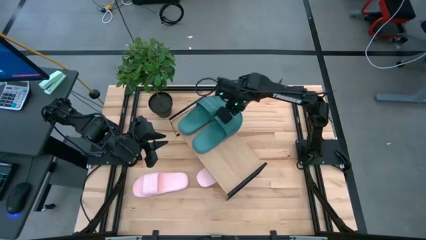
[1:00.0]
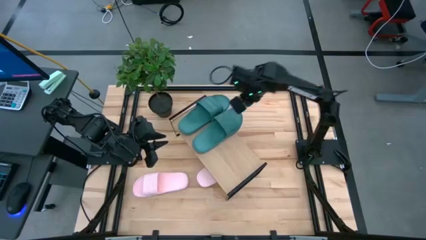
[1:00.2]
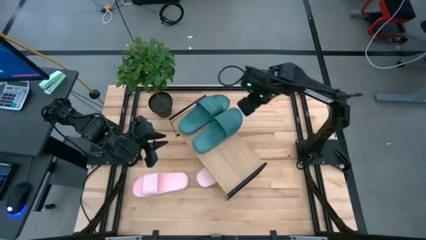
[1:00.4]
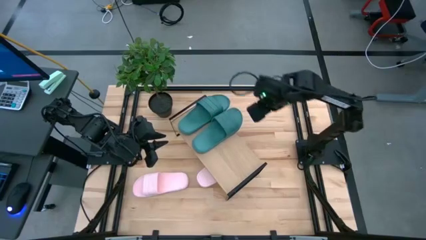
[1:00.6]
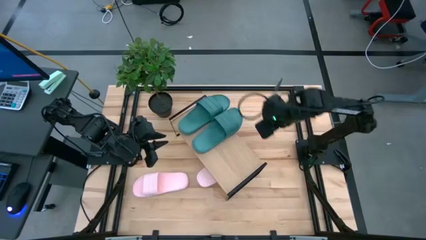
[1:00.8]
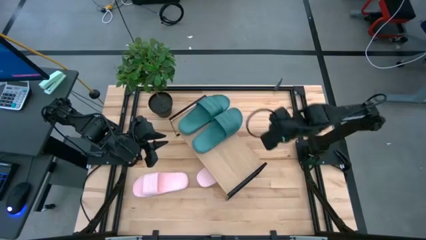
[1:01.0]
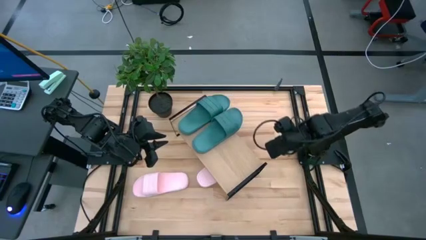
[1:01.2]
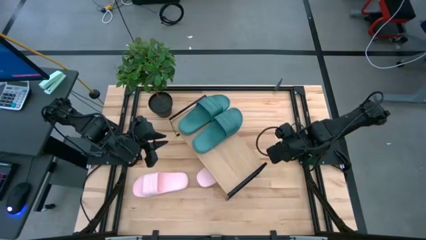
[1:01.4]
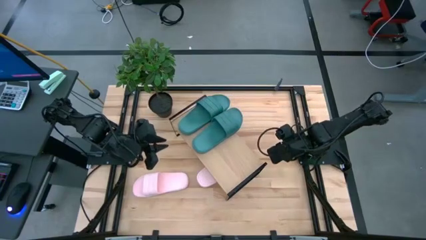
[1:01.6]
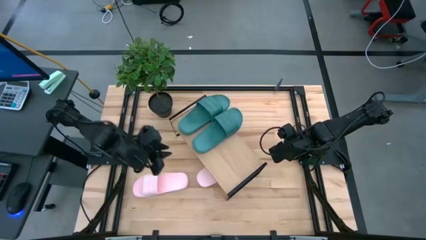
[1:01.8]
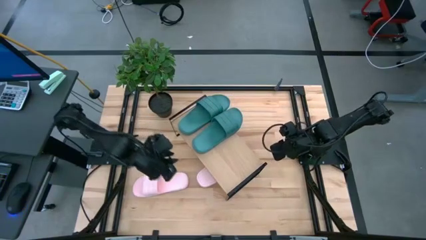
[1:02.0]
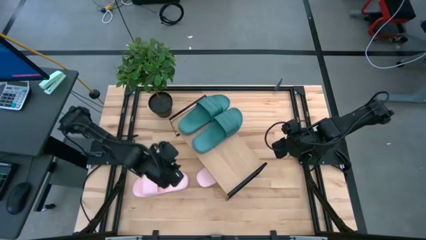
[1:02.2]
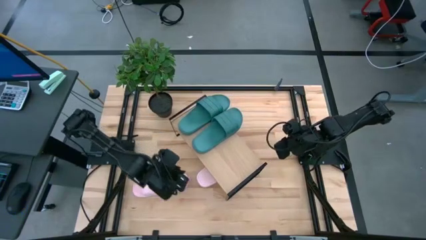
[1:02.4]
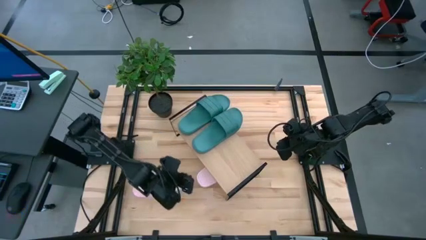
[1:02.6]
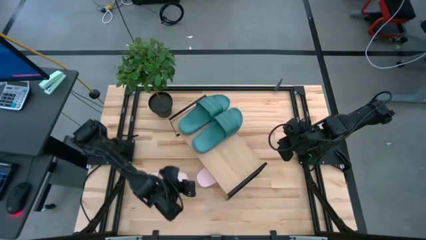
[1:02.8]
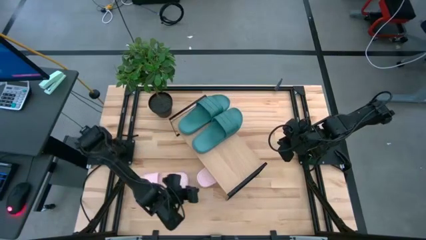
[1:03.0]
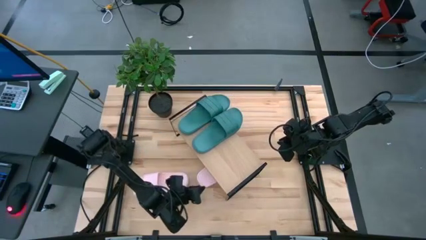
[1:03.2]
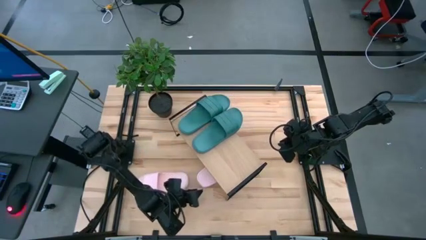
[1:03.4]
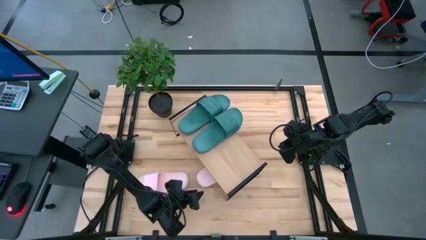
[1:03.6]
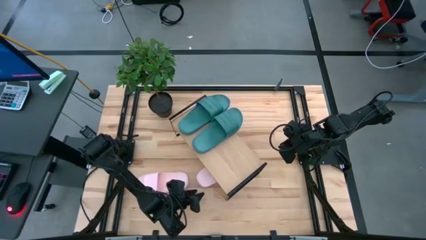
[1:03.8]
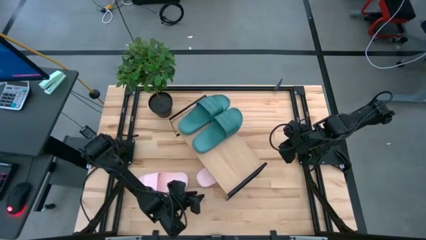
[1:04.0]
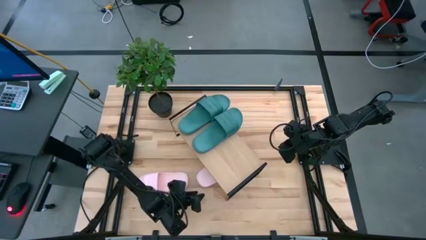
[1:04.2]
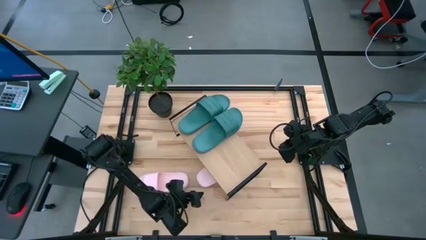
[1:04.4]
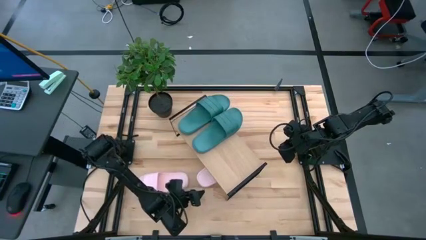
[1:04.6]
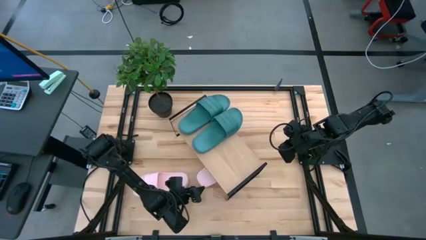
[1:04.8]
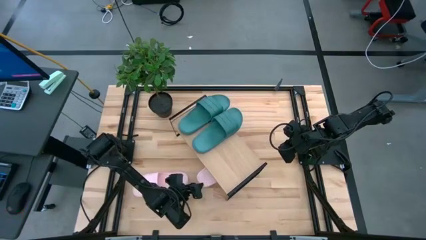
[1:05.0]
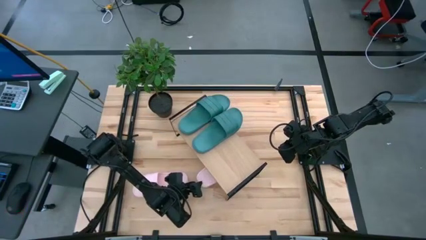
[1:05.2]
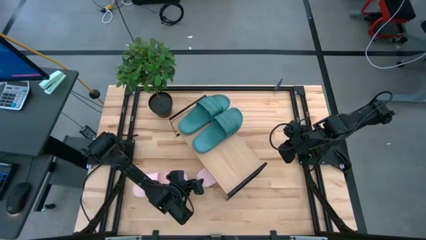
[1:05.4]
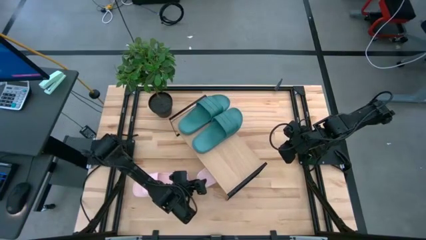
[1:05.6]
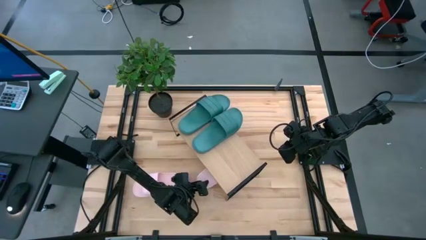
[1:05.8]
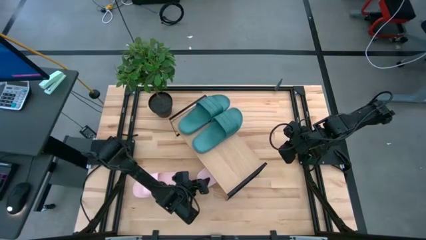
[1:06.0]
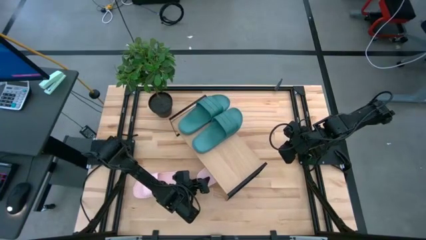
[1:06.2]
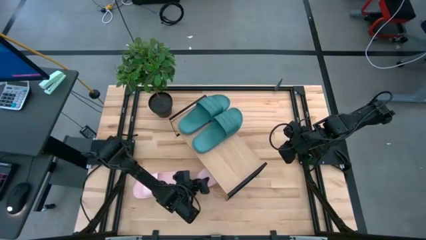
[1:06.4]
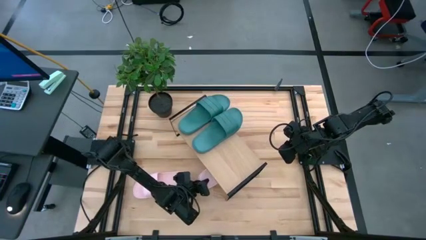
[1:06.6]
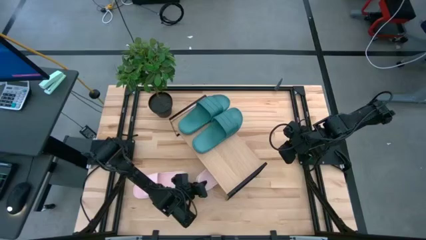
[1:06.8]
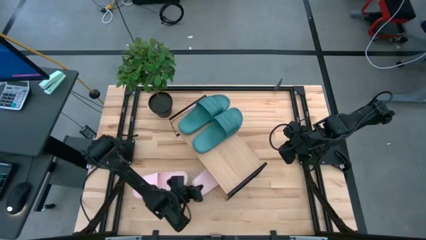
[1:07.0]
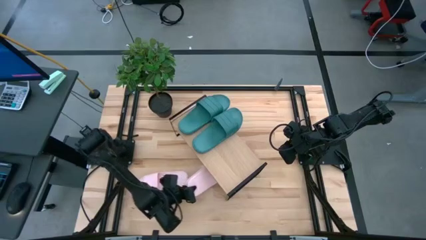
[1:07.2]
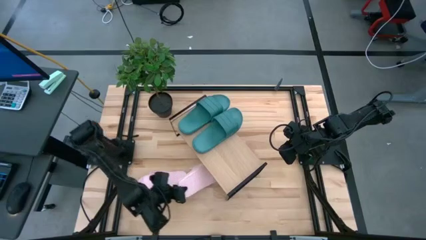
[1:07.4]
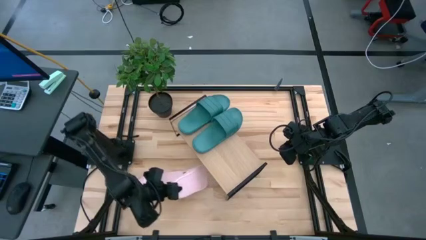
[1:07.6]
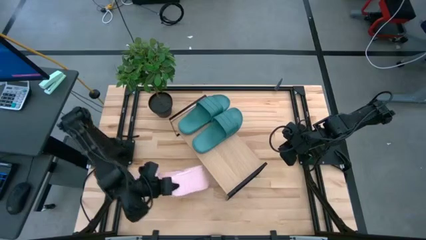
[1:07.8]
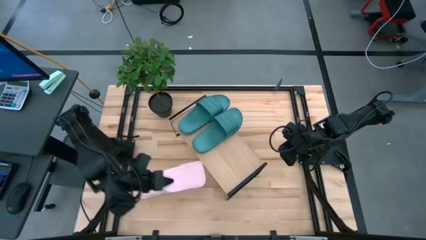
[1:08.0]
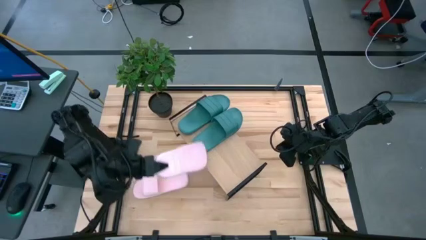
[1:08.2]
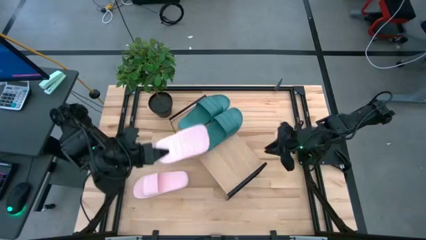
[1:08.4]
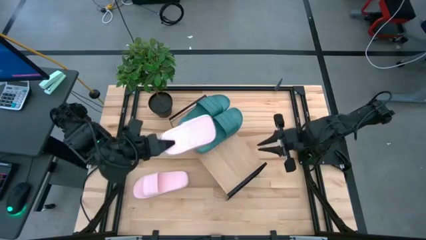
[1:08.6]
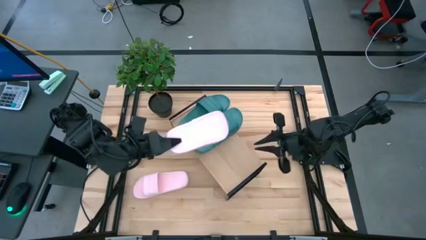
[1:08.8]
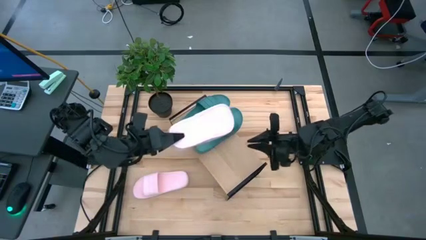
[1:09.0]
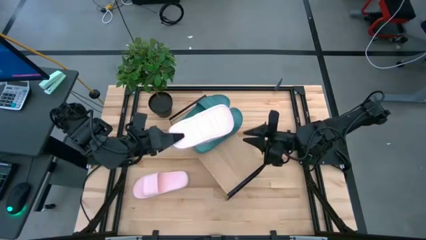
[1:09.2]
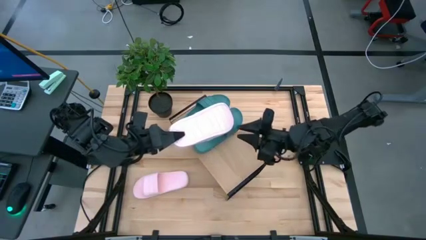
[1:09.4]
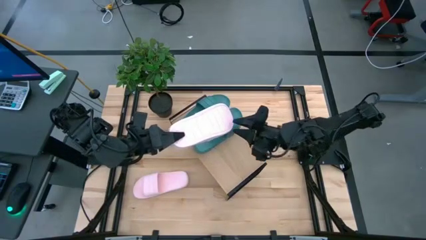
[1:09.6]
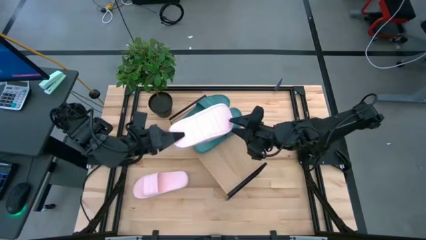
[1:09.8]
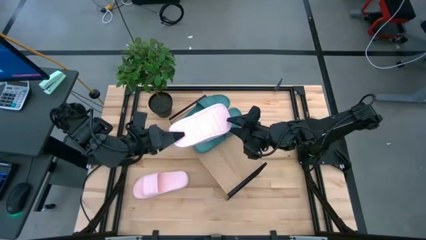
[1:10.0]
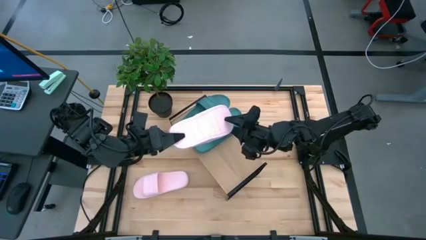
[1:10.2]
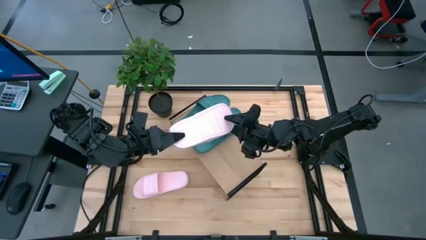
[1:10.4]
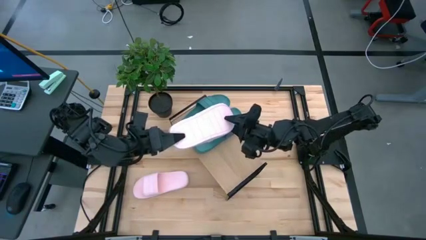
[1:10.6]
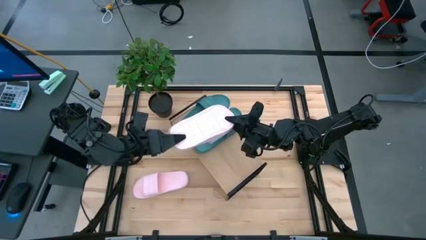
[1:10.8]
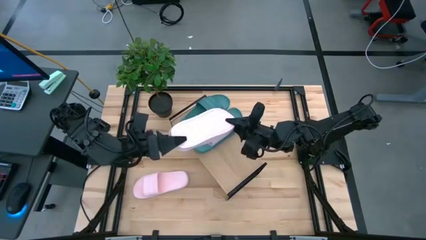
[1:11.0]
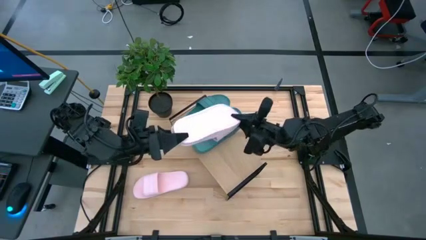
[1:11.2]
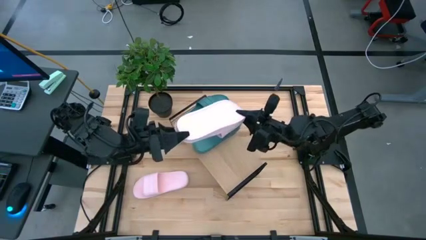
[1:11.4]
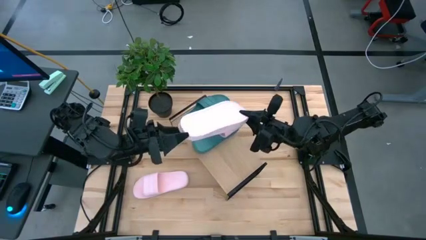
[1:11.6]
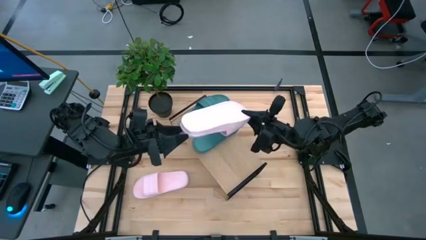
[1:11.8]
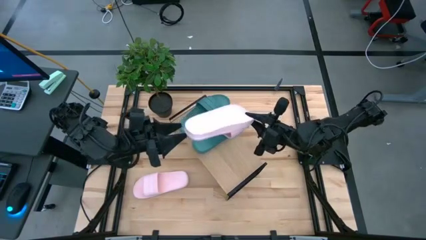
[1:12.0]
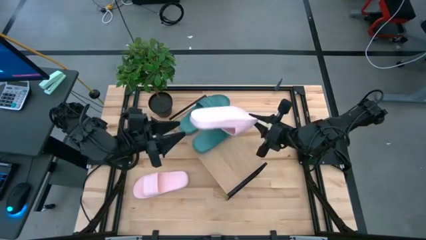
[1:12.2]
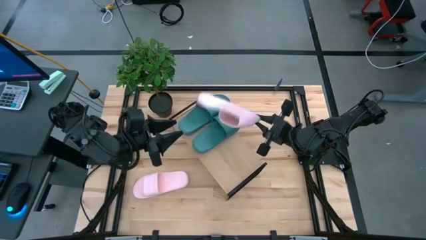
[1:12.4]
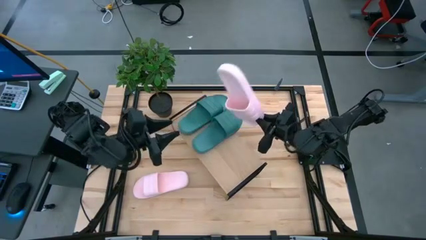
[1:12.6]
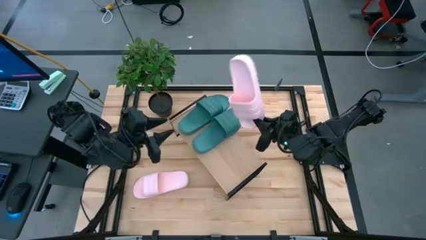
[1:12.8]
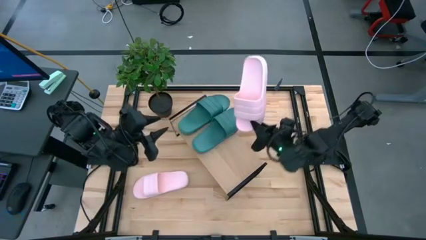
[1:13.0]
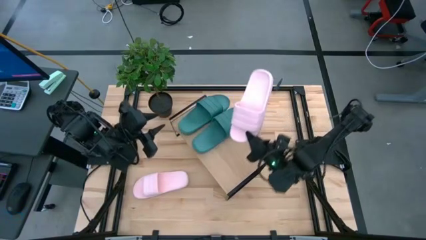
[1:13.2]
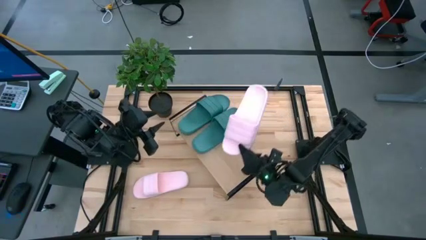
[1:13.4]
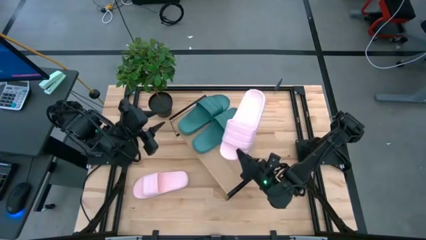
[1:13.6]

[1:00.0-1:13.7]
Task: Pick and place slides into the shelf
Put the right pink slide slipper on the shelf

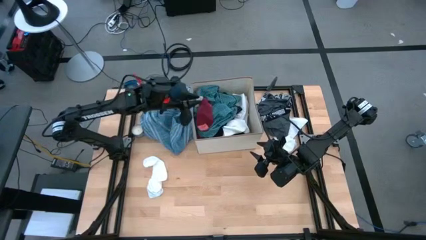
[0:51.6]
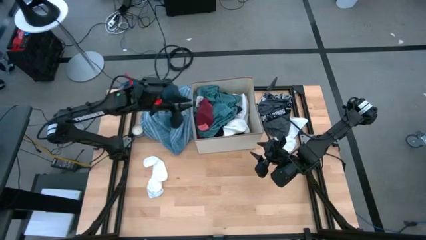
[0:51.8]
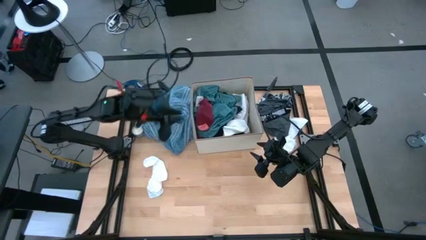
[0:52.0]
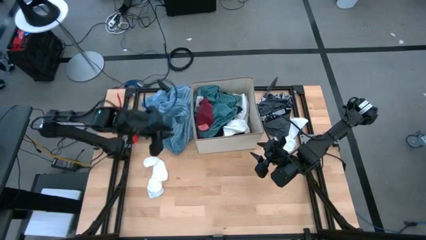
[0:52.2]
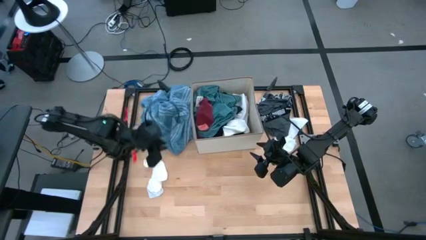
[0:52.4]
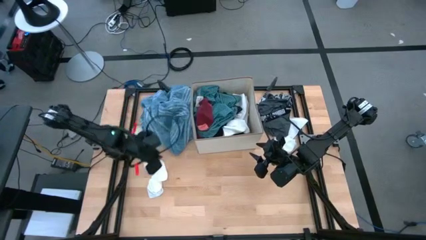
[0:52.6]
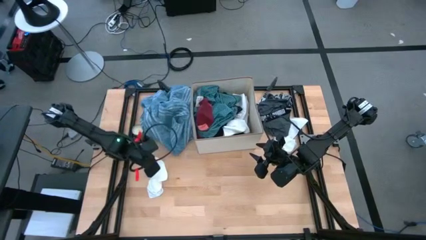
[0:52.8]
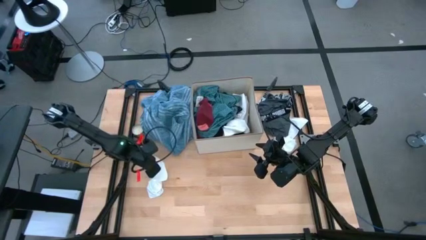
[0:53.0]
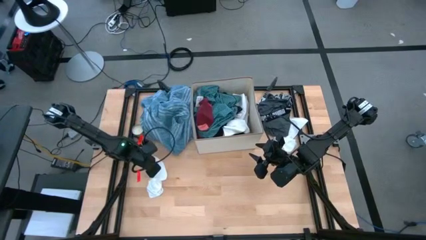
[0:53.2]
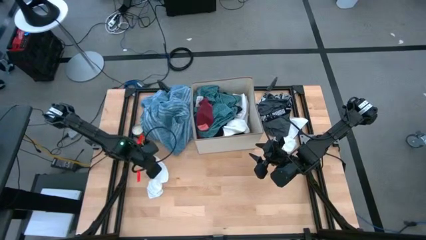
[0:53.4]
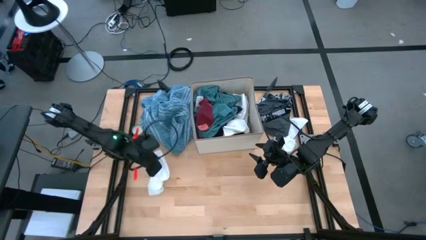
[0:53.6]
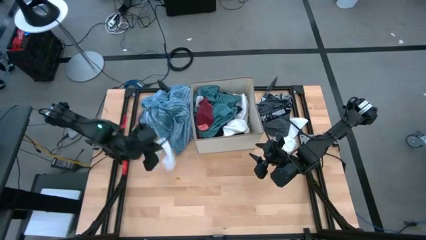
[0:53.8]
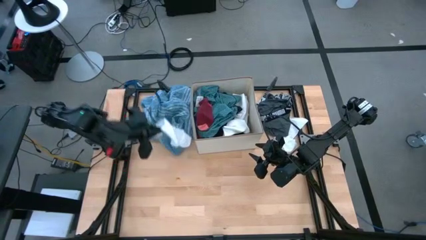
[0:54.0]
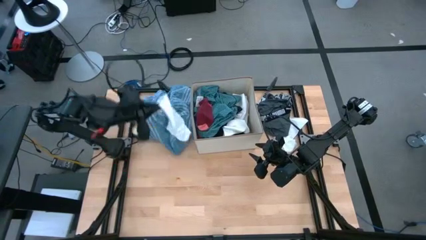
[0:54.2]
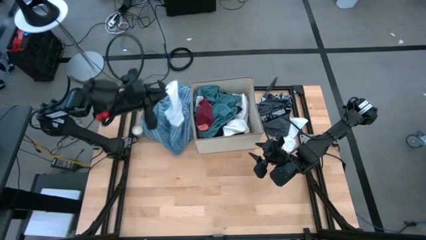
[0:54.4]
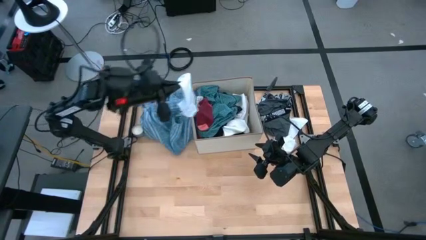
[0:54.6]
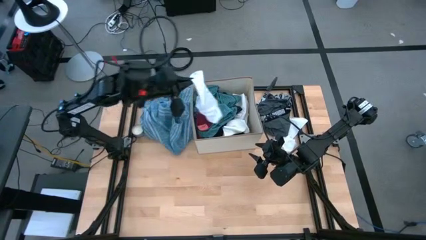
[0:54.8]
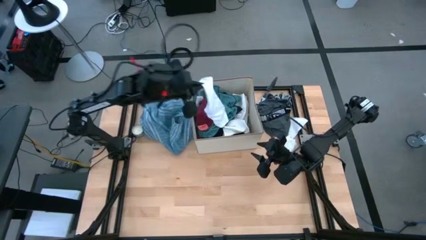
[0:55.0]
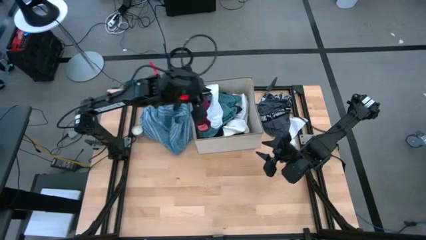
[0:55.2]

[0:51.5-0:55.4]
Task: Sort clothes
Put the left white sock into the bin
